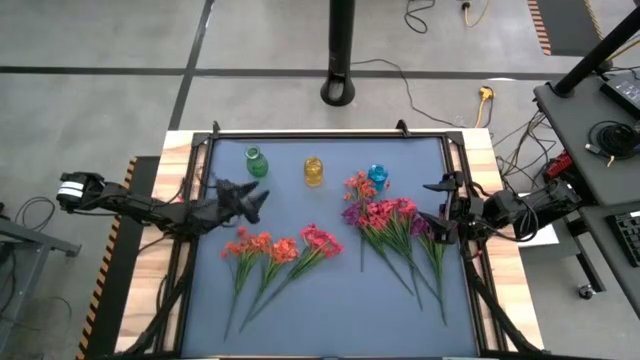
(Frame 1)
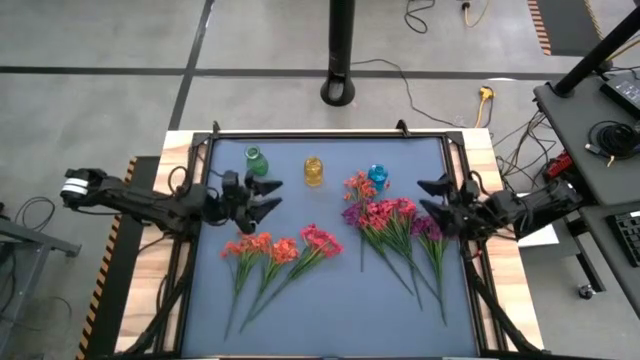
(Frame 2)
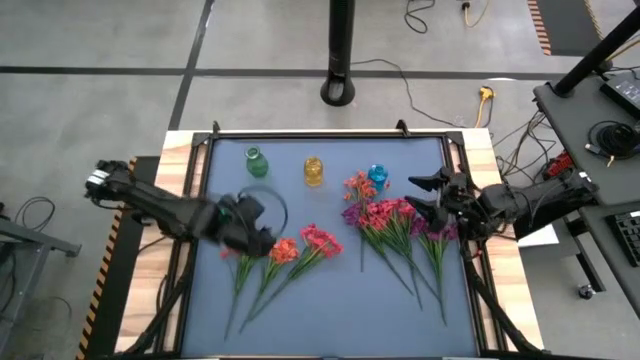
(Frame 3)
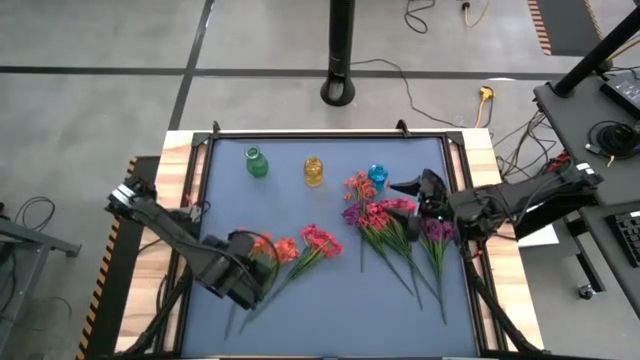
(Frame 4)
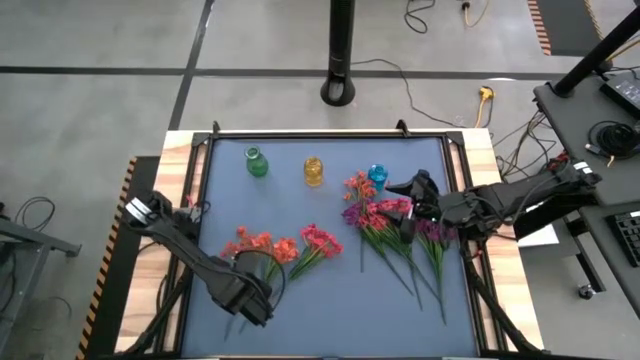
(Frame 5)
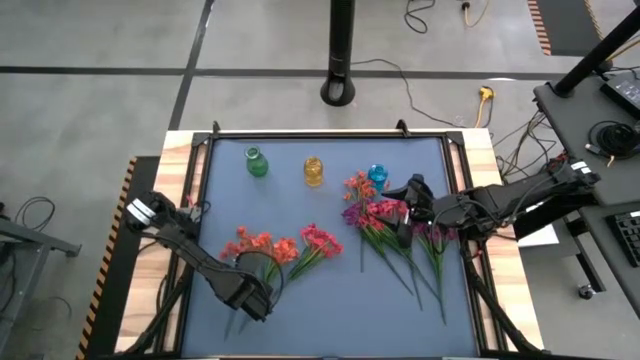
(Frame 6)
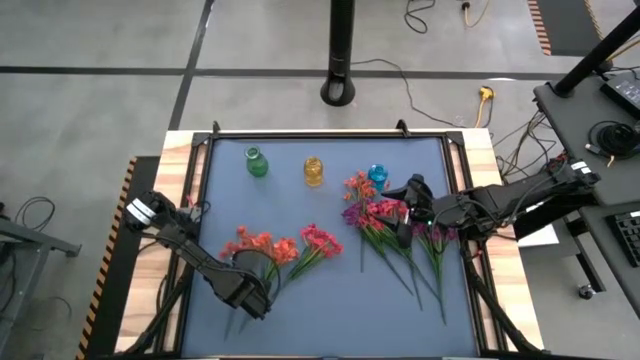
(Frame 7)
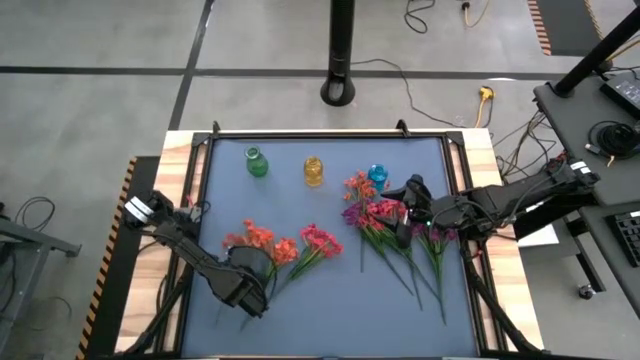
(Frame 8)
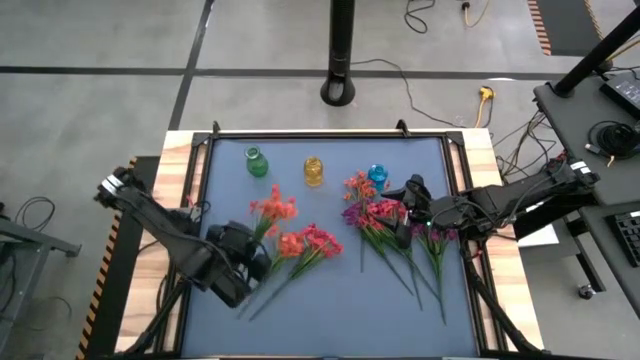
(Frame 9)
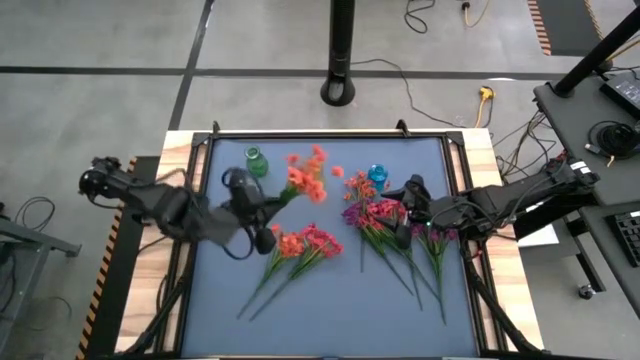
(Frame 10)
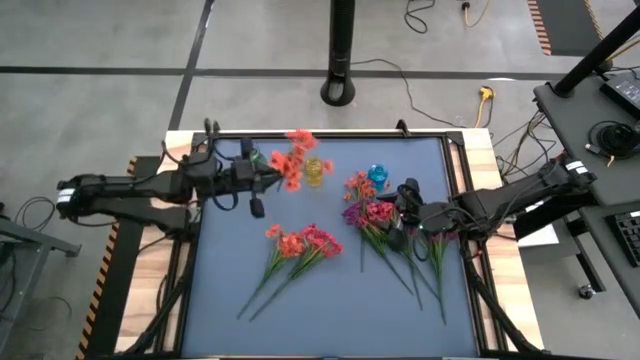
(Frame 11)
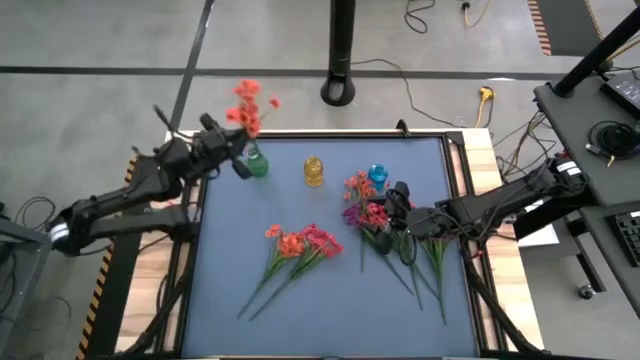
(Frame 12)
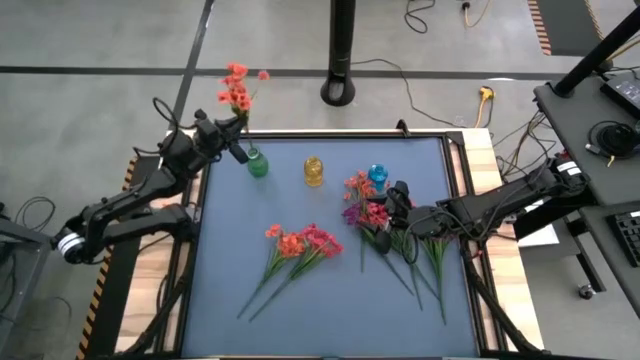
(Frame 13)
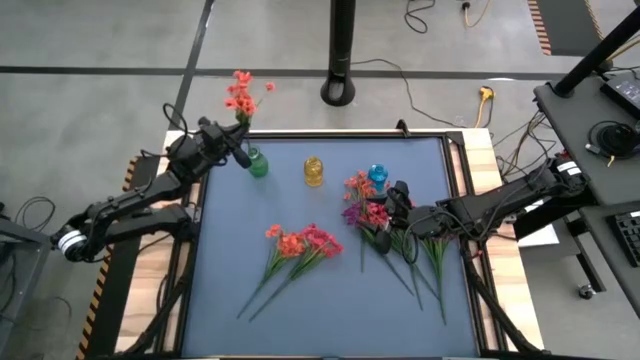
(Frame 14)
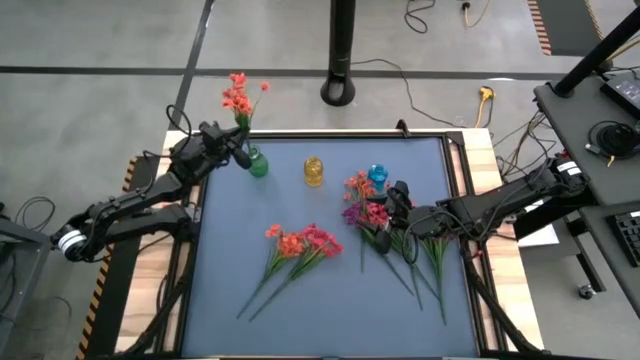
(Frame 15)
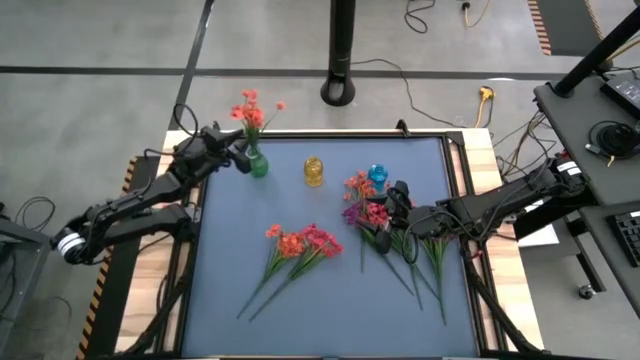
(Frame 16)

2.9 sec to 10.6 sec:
Task: Sort flowers into vase by color
Put the bottom left orange flowers into the green vase

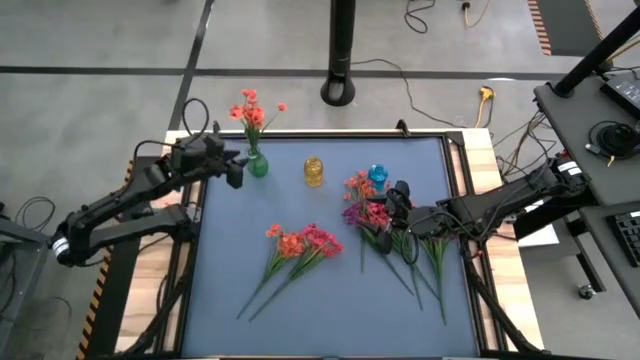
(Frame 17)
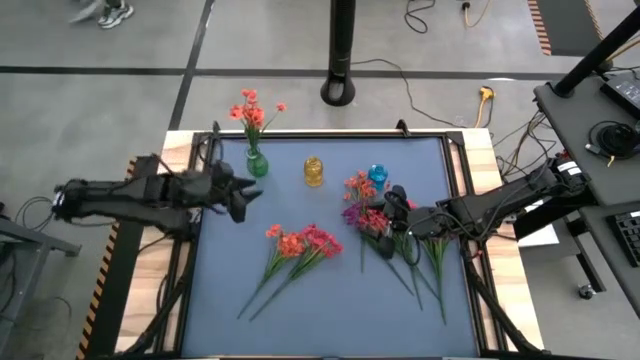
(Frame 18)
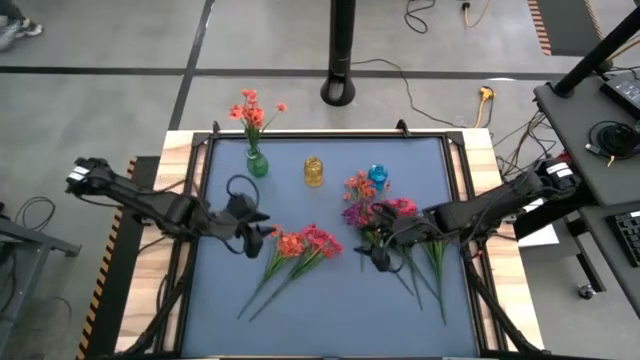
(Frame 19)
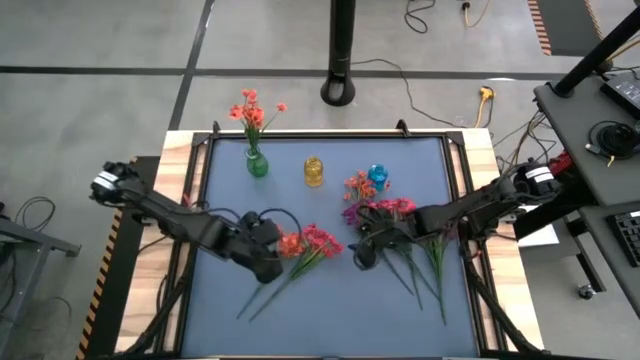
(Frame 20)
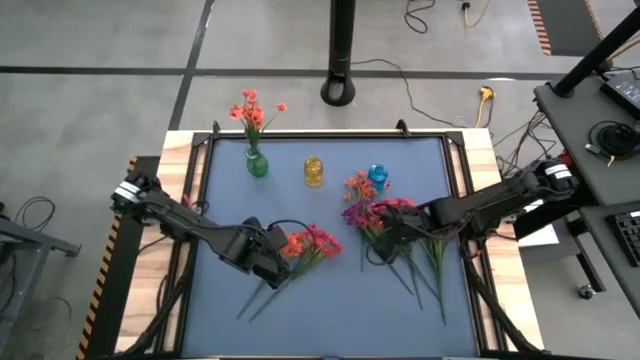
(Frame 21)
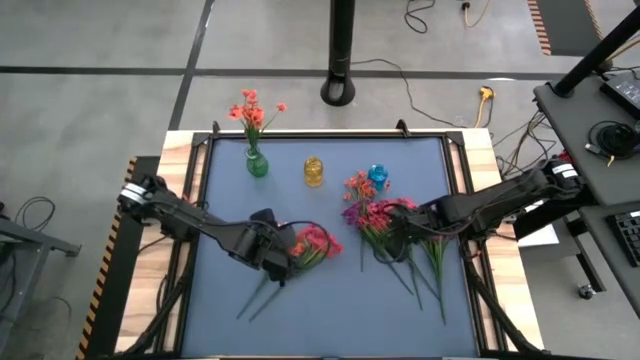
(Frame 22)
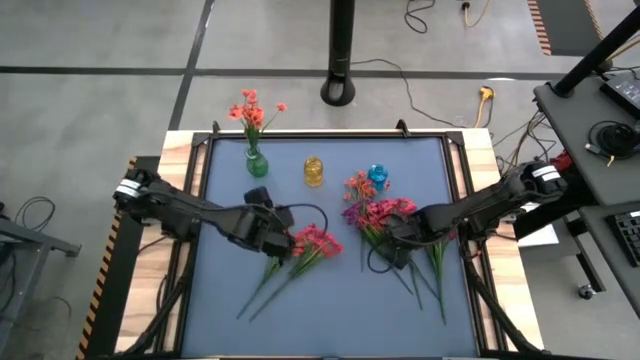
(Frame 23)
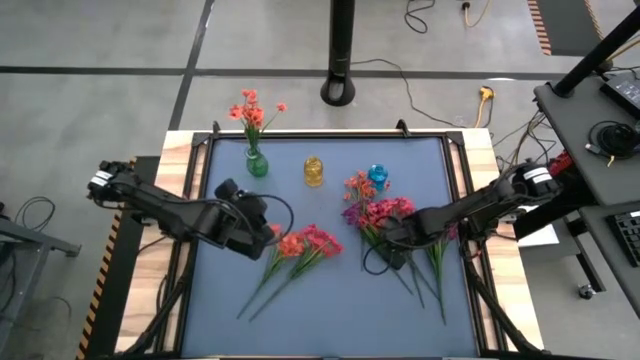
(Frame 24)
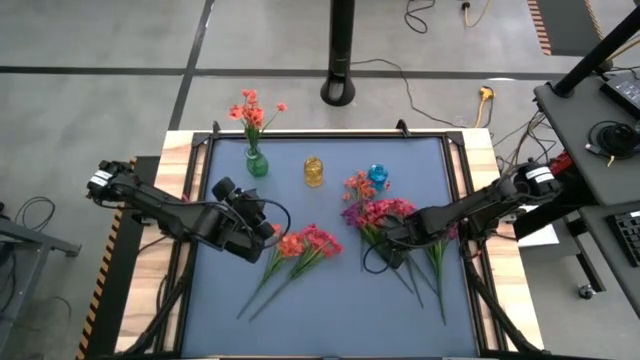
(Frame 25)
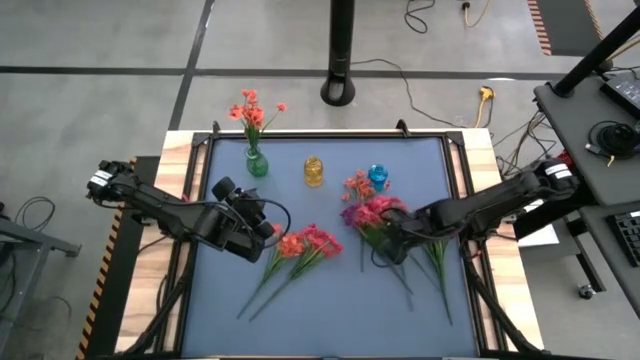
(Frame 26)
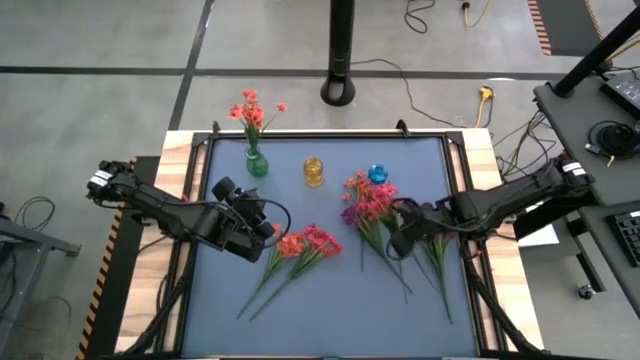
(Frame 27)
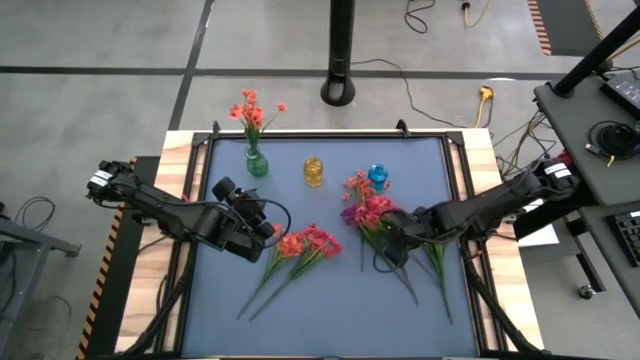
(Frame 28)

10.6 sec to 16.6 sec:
Put the top left pink flowers into the blue vase

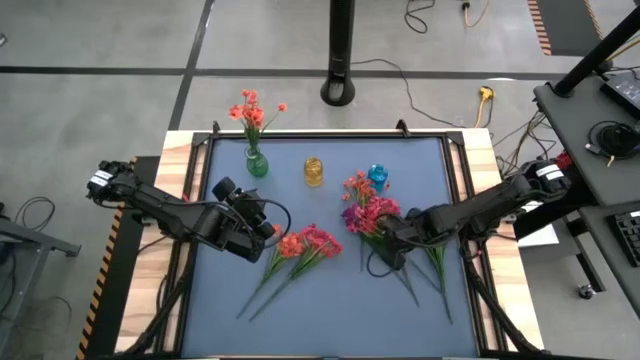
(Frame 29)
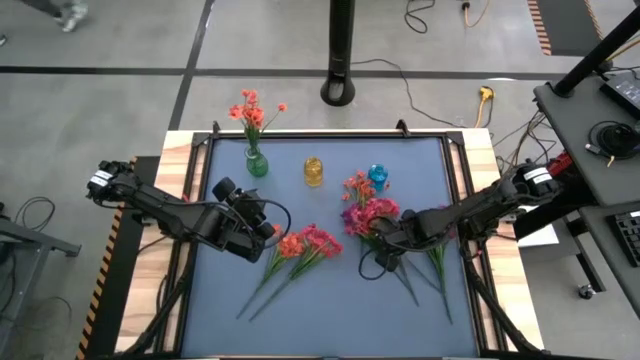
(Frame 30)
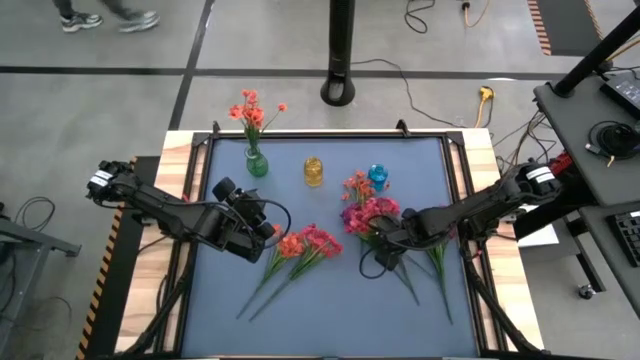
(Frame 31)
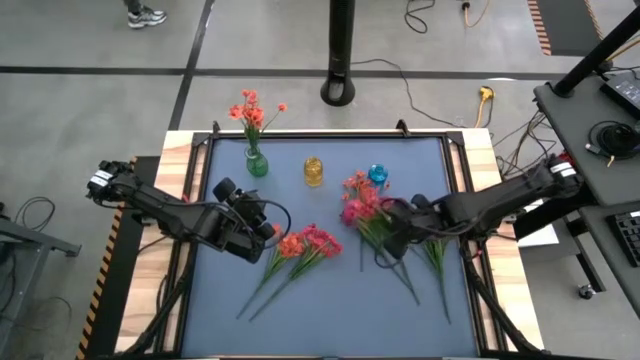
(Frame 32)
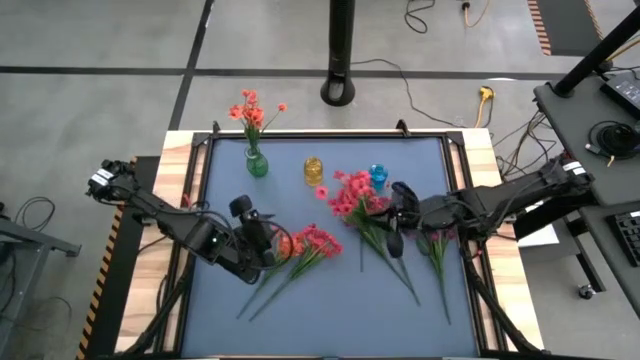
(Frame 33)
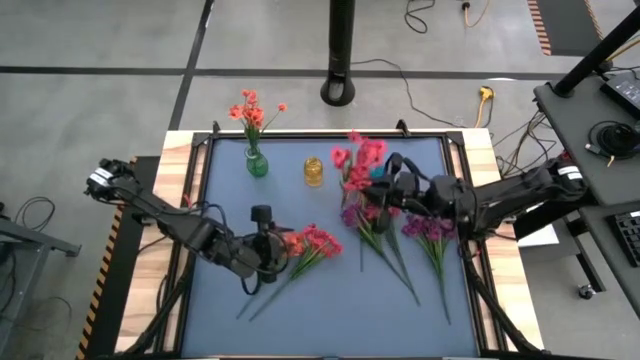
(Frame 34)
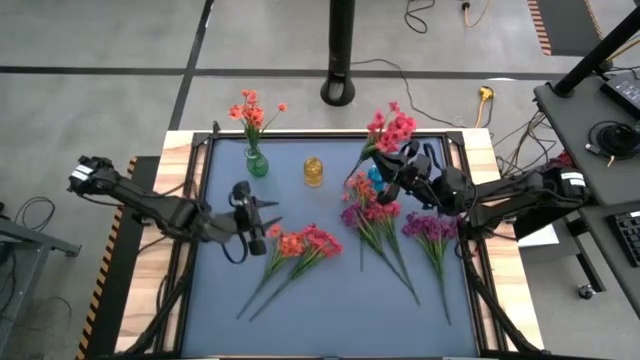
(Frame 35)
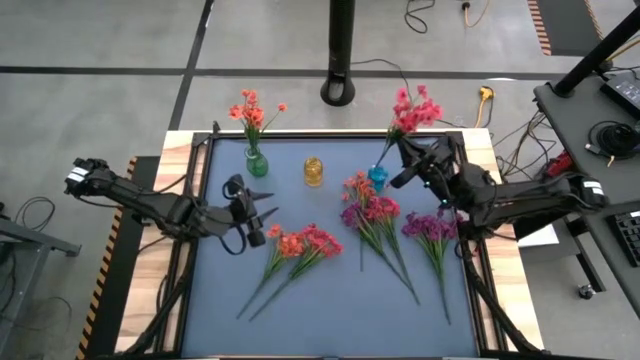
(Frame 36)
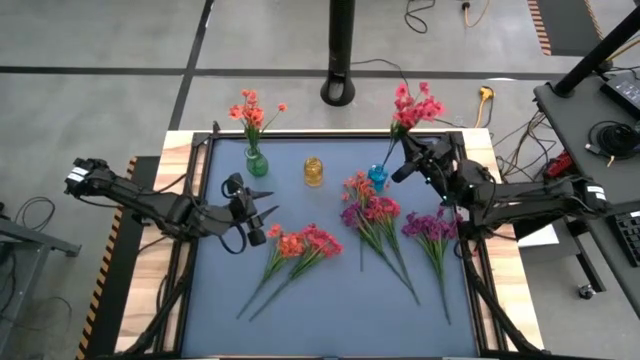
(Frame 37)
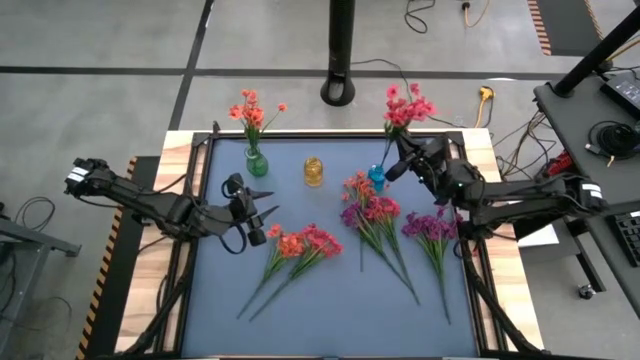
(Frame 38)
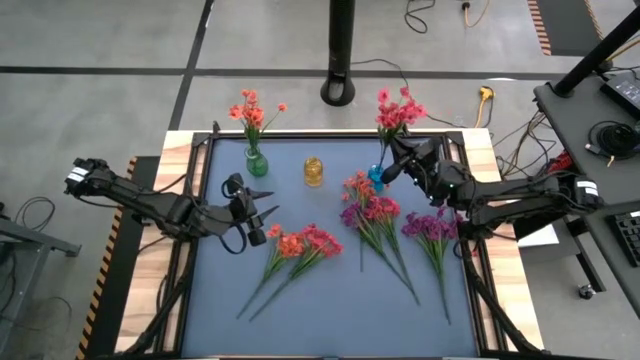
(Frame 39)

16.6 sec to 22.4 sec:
Put the top left pink flowers into the blue vase

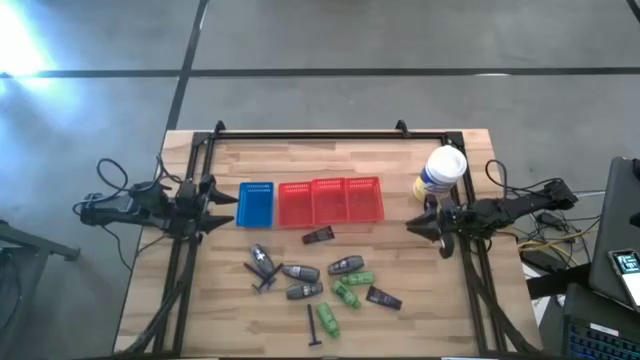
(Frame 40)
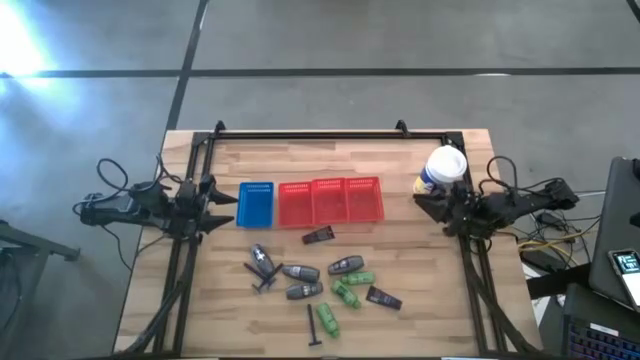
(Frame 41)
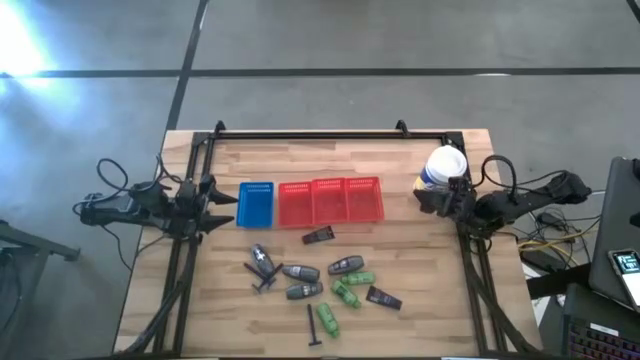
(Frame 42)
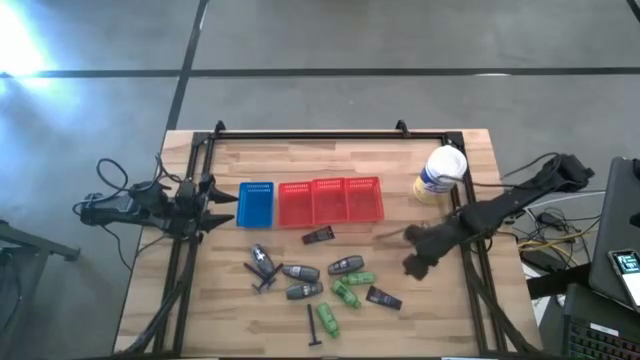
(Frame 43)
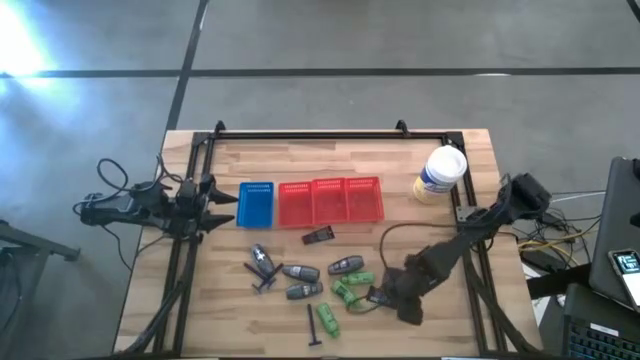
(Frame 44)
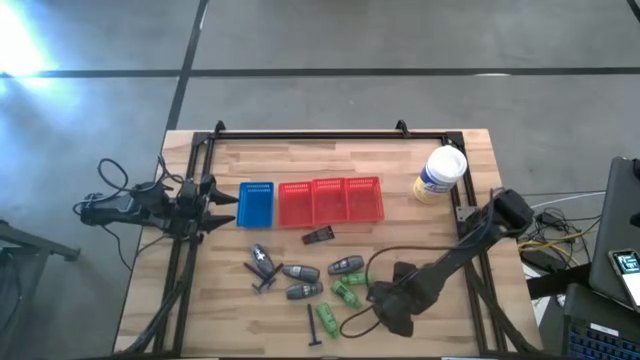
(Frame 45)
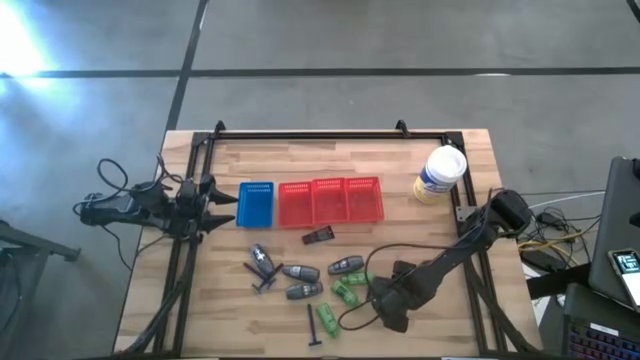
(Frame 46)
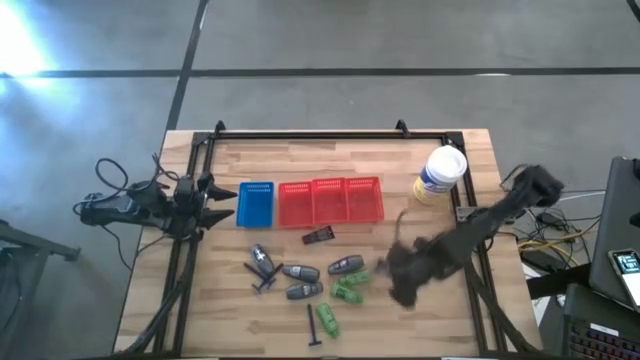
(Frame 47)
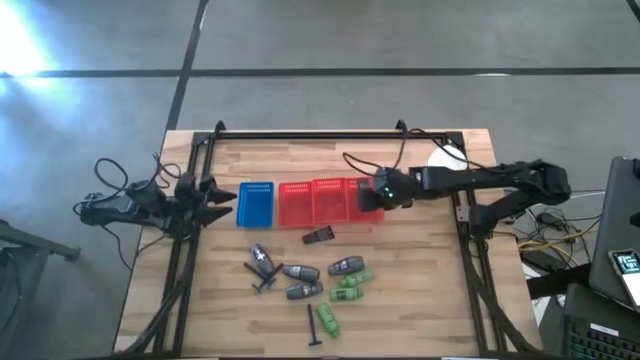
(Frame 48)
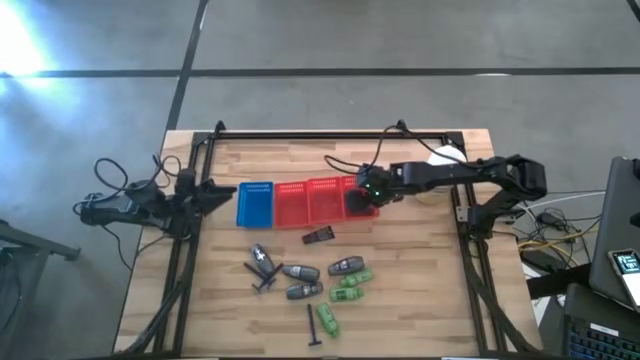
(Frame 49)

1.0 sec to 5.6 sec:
Task: Pick & Place Travel size toiletries
Put the right blue shave cream into the right red bin
